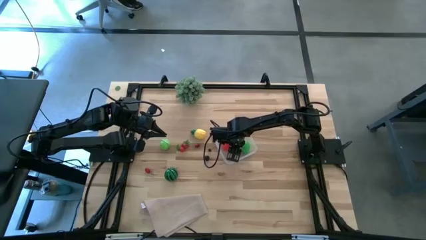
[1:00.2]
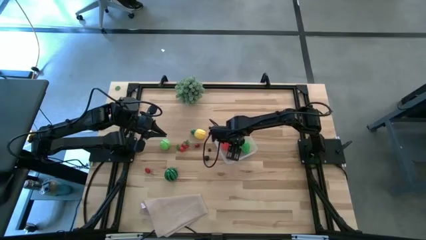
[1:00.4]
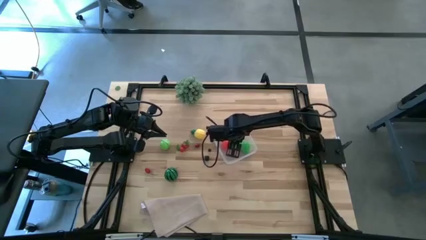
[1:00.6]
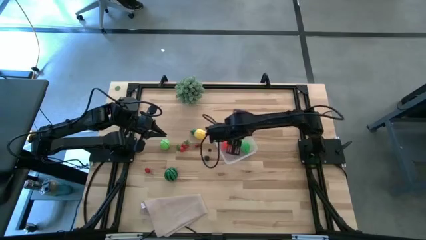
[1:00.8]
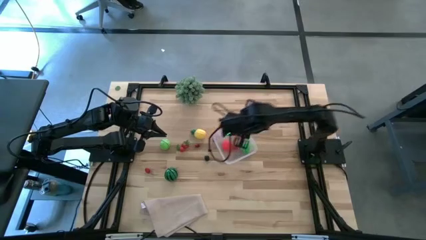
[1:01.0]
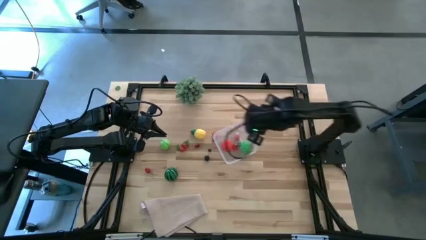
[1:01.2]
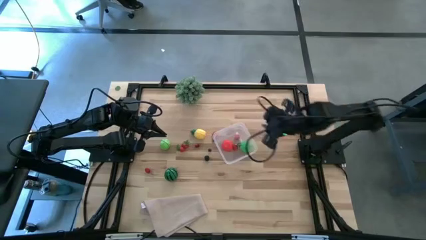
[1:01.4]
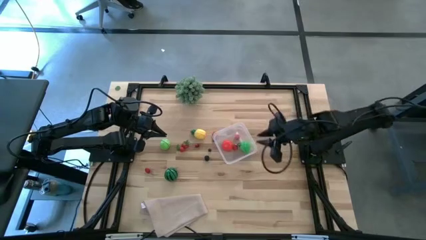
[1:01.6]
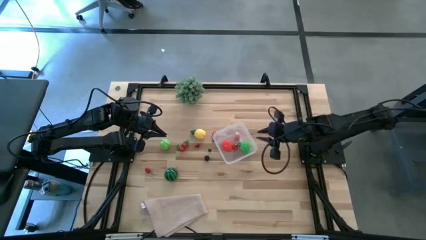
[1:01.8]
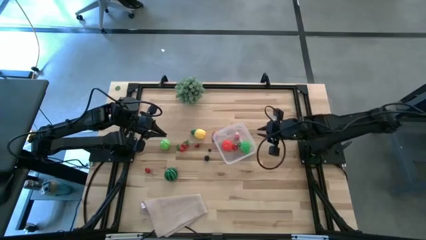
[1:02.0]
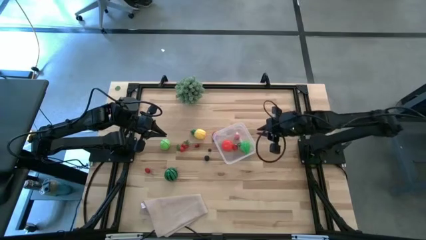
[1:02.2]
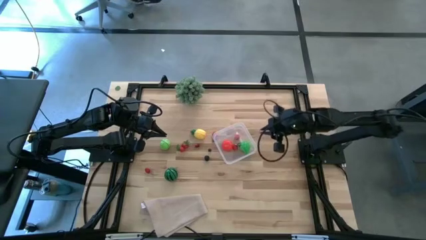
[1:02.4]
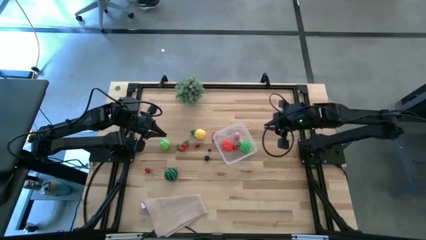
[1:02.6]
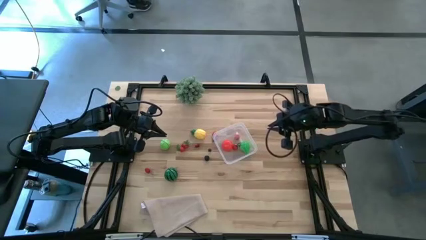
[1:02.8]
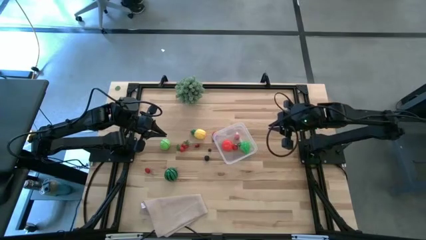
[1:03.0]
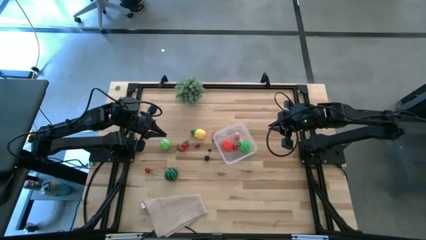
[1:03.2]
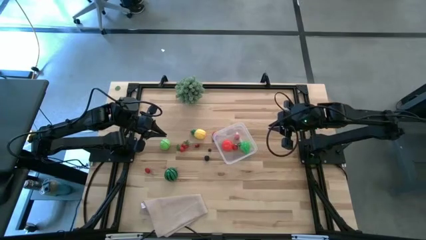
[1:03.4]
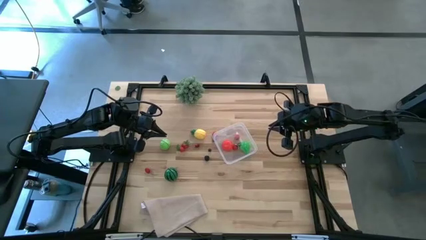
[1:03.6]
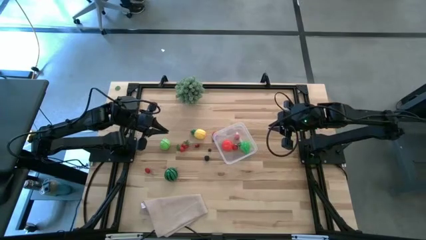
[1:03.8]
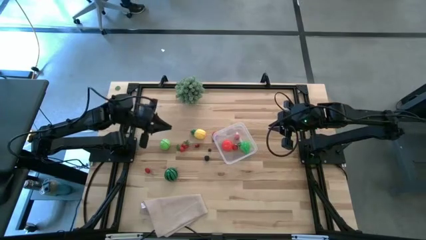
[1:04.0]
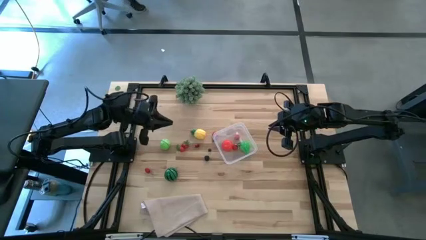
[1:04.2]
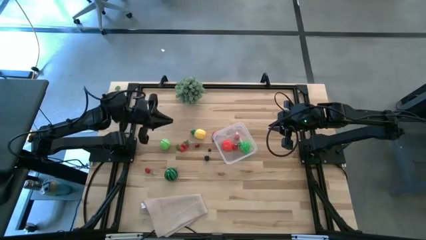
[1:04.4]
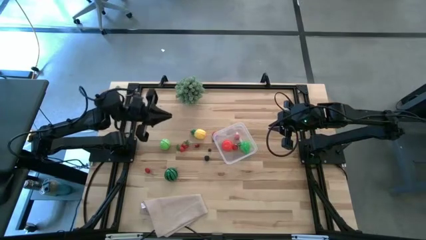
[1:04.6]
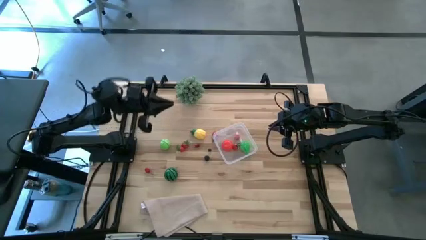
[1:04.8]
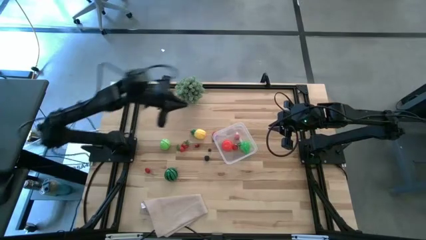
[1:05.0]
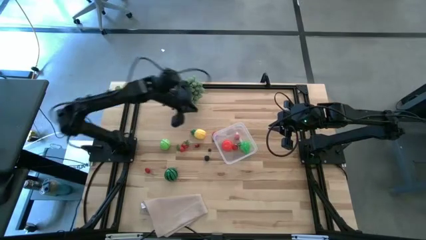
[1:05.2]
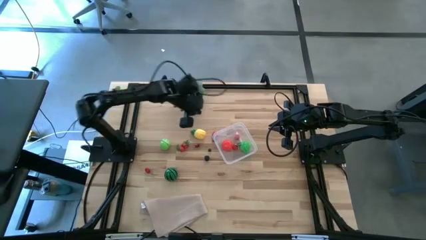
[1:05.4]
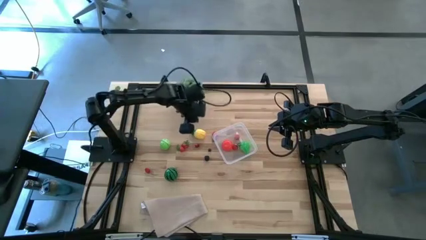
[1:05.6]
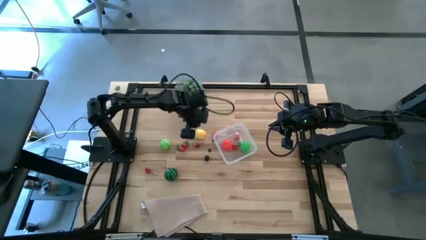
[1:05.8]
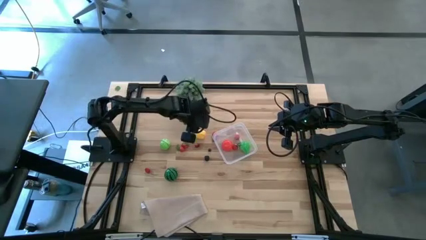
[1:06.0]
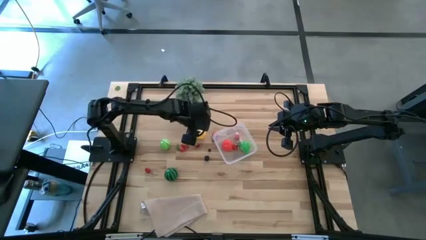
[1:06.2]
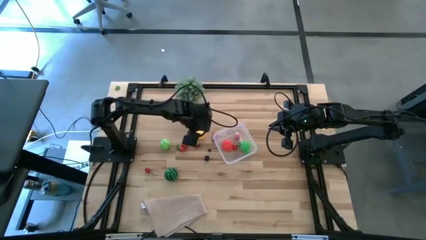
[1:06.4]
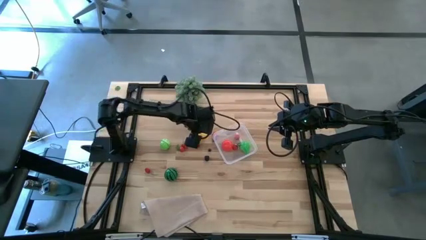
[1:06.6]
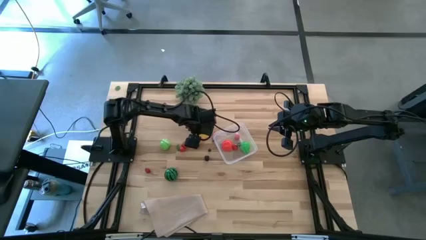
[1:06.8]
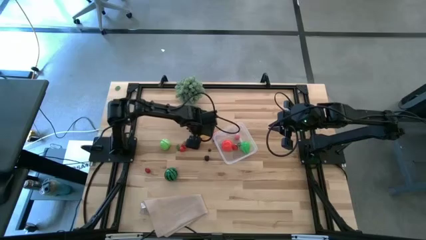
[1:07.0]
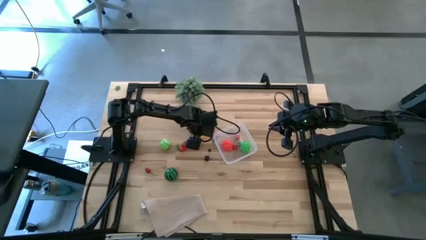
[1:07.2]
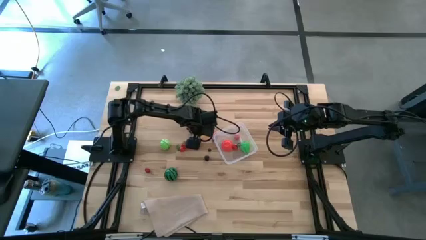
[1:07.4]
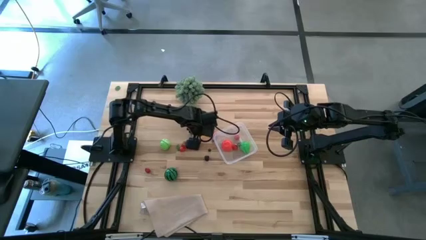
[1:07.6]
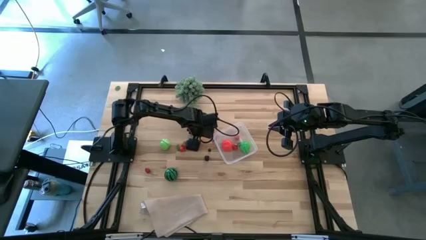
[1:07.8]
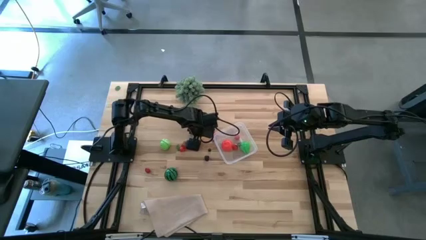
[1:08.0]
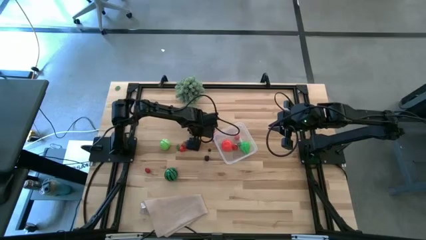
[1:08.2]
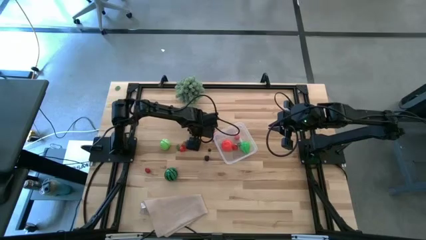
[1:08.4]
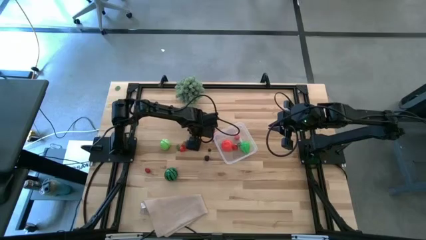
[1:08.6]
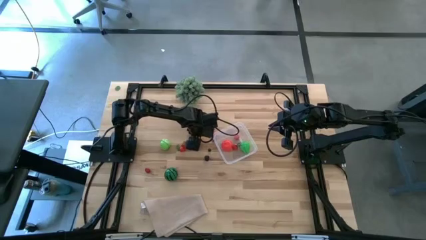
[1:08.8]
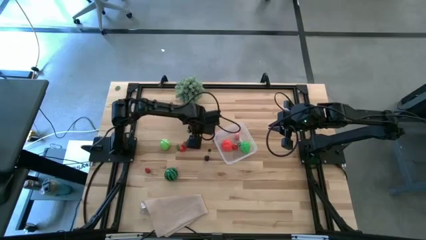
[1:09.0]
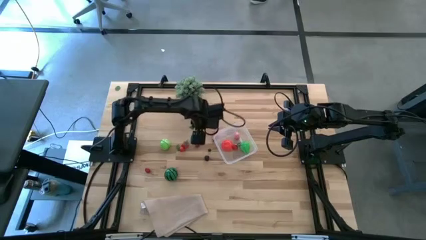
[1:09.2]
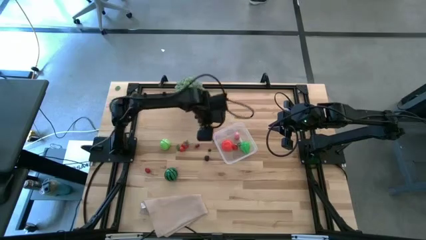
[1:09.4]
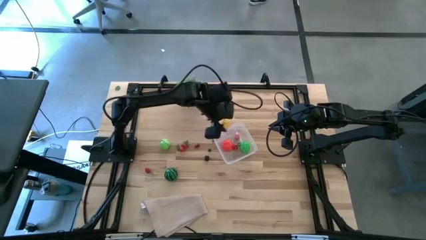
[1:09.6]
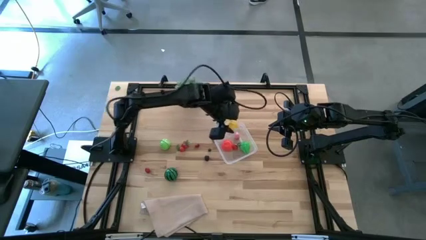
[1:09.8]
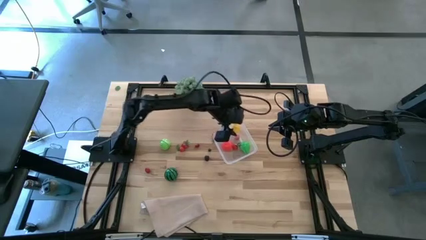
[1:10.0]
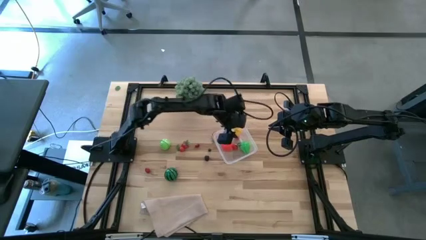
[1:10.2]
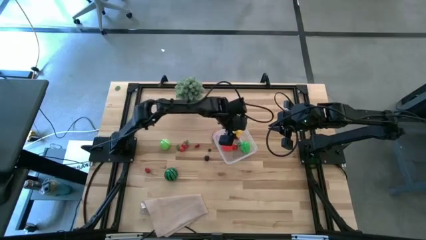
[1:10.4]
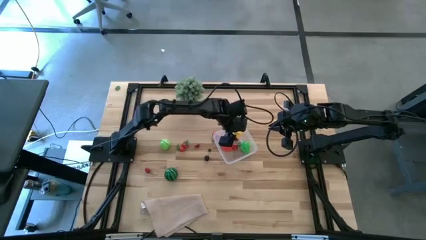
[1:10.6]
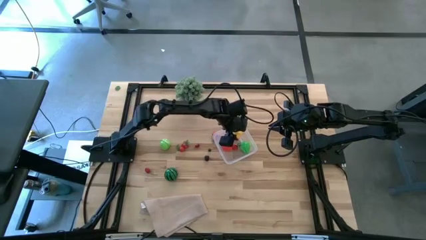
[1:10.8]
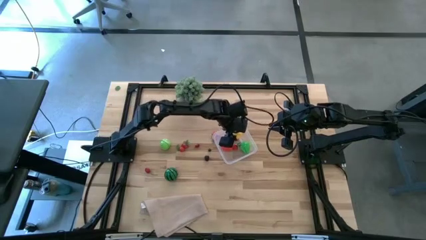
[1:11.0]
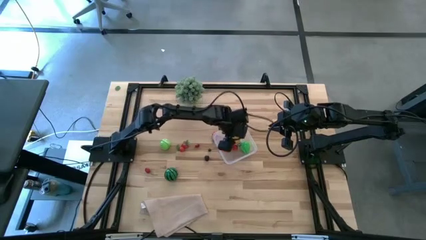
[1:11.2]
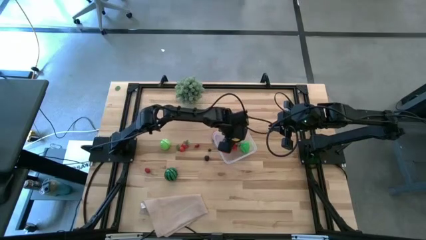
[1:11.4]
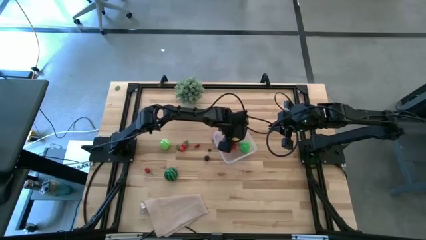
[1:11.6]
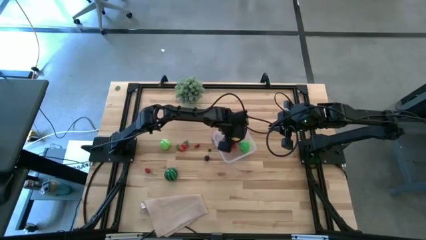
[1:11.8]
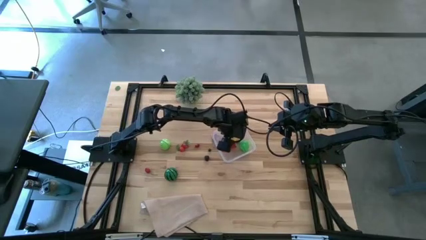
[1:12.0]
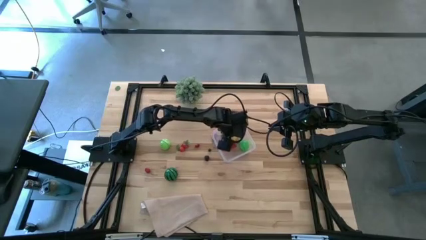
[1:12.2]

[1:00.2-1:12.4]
Task: Pick and placing Produce into tupperware
Put the pineapple into the transparent bin

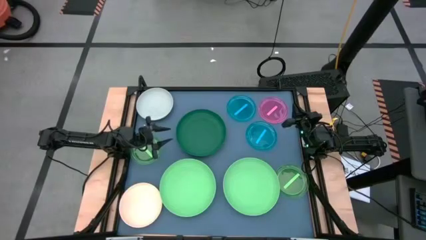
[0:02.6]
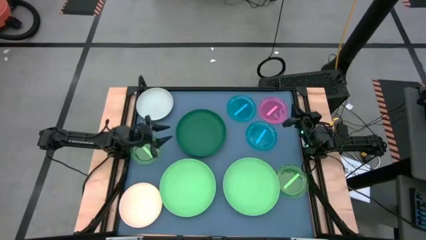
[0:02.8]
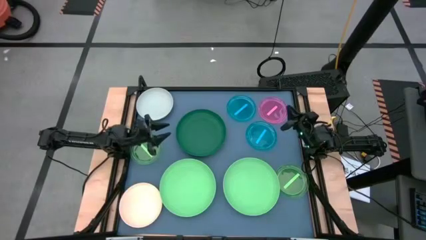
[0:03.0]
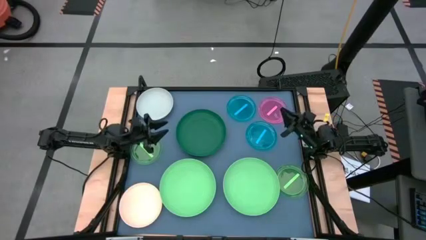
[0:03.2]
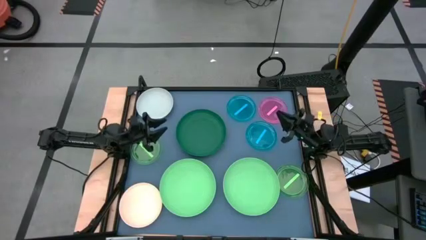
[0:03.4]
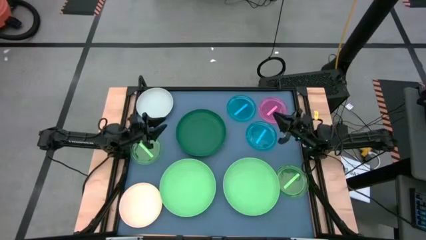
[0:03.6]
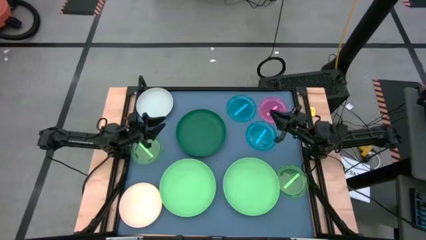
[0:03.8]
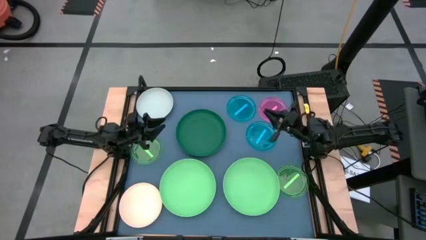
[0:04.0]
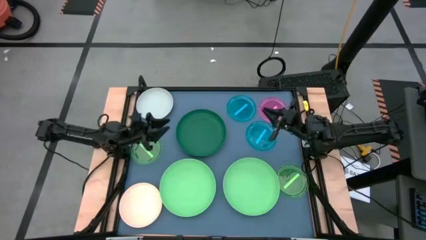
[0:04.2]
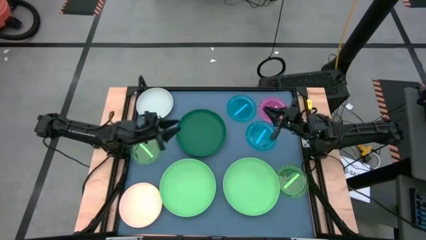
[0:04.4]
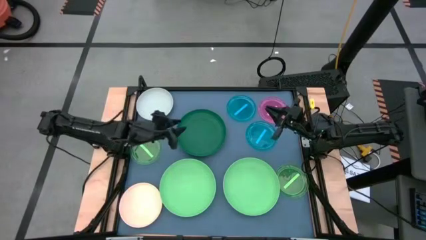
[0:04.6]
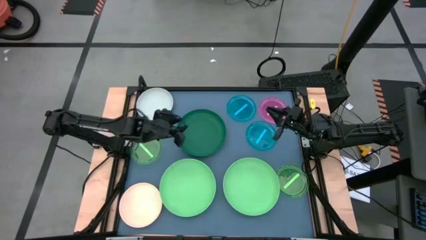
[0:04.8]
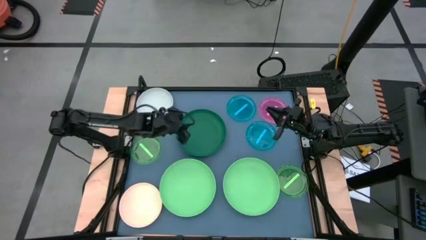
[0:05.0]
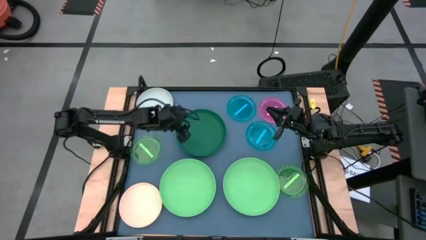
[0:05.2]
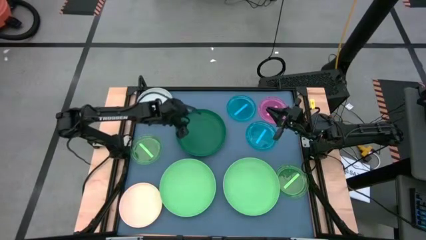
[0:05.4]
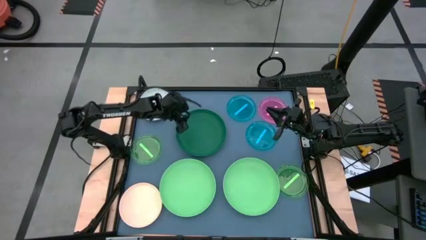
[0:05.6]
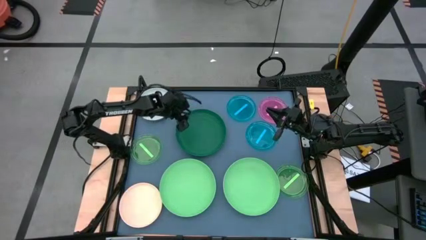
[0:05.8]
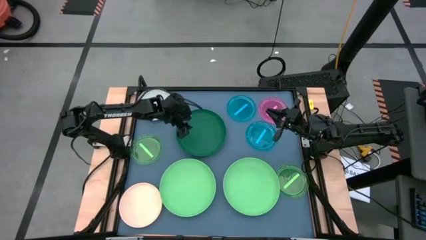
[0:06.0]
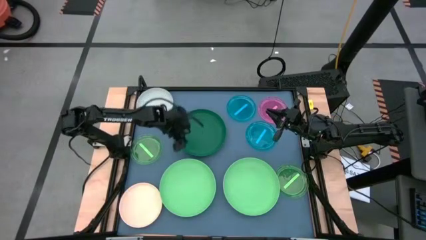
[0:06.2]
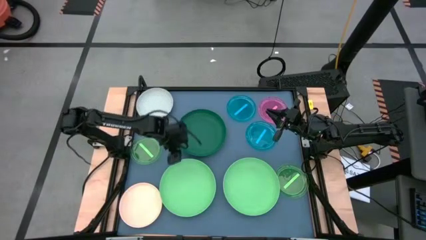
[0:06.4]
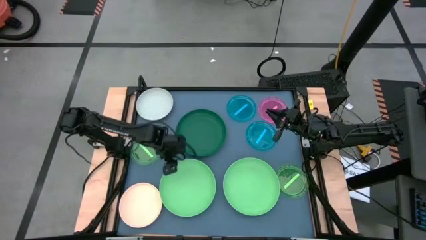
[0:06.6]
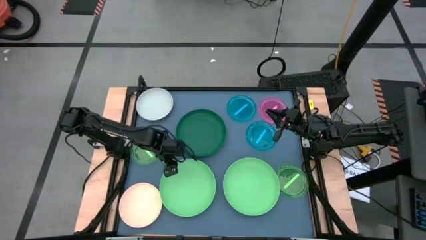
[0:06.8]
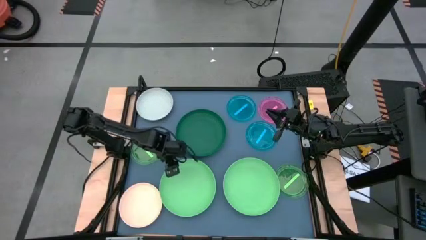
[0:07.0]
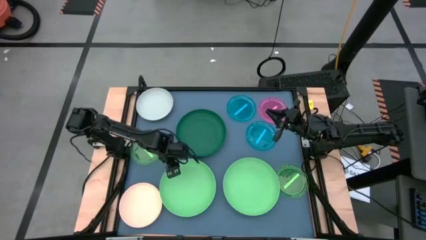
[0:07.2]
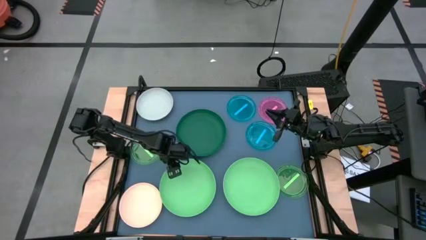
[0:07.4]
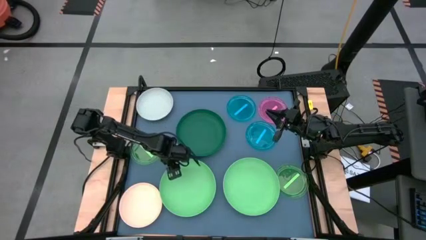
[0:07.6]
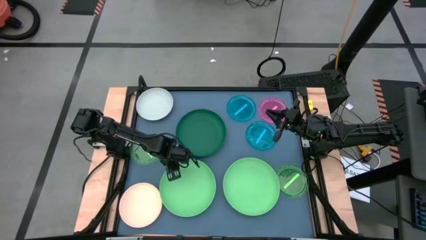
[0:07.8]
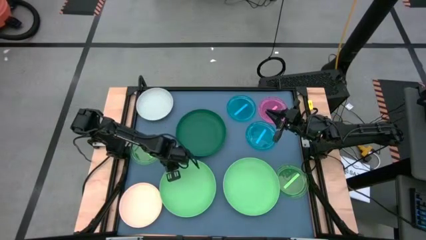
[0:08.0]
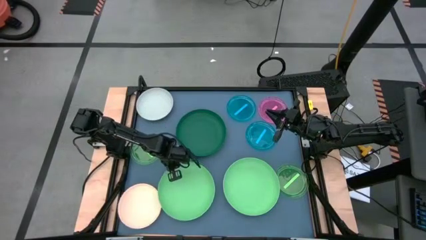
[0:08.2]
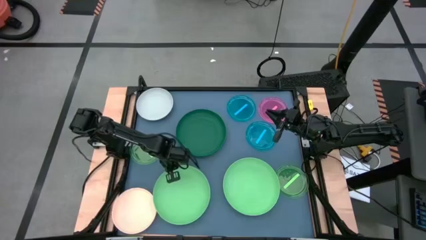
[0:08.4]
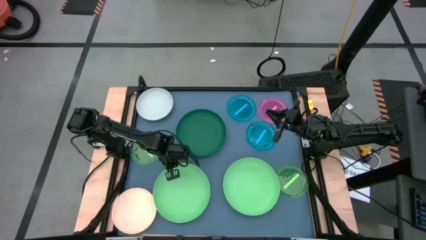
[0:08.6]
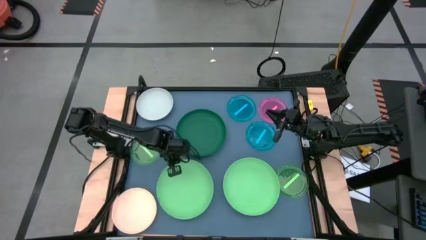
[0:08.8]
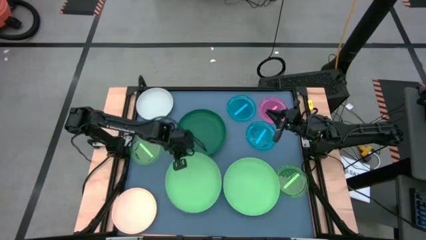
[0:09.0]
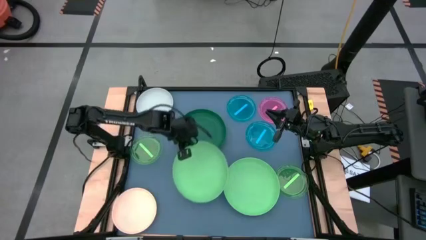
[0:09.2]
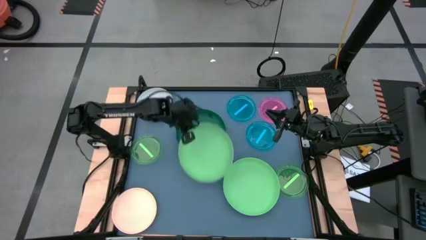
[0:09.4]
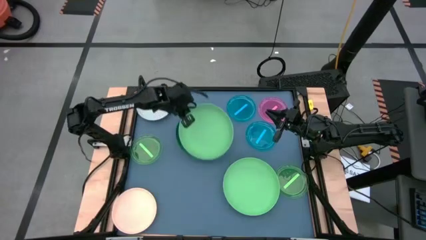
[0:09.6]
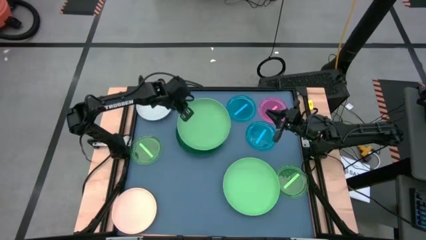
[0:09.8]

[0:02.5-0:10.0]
Task: Stack plastic plates
Stack the left green plate on top of the dark green plate
